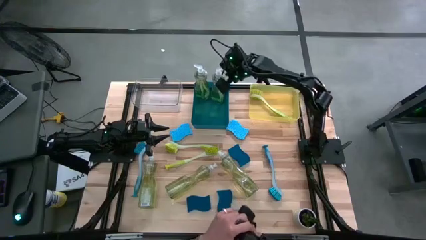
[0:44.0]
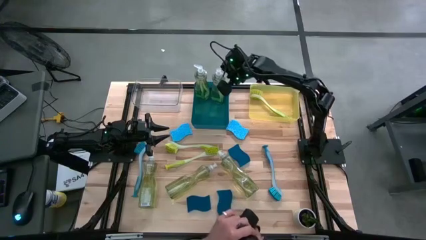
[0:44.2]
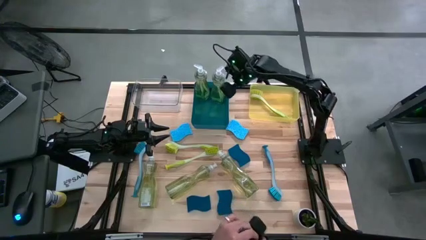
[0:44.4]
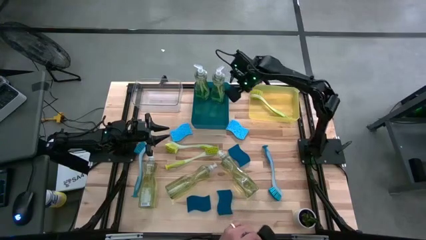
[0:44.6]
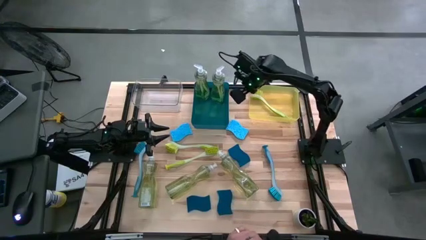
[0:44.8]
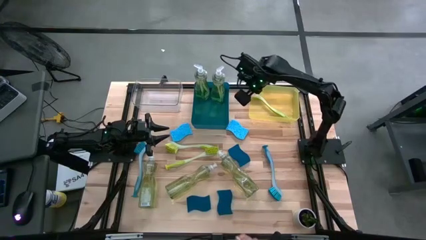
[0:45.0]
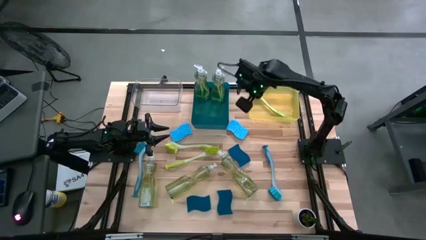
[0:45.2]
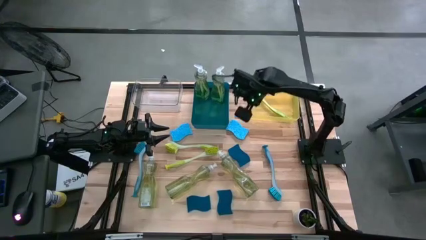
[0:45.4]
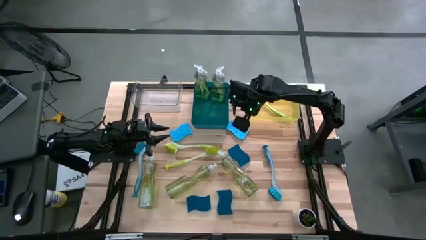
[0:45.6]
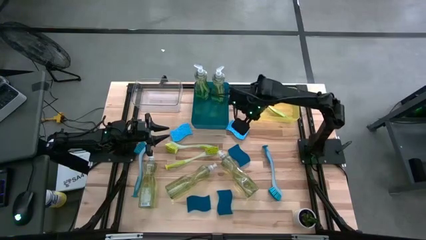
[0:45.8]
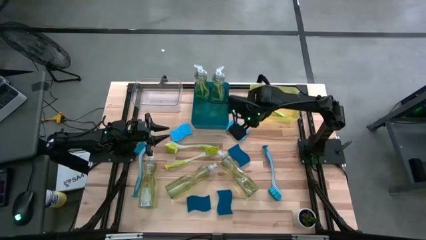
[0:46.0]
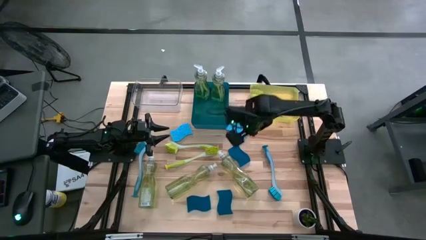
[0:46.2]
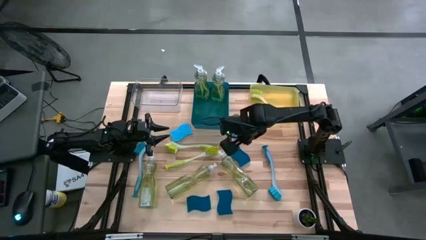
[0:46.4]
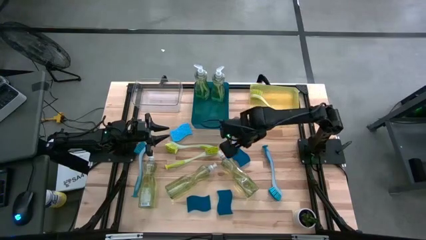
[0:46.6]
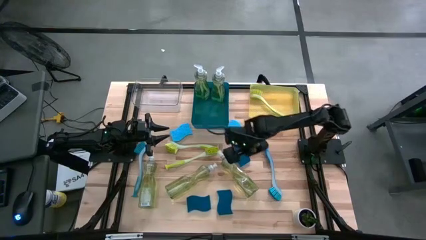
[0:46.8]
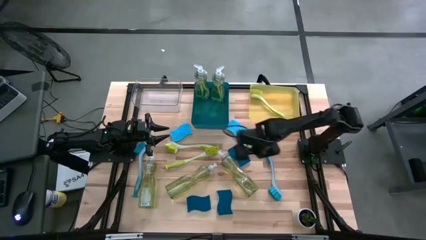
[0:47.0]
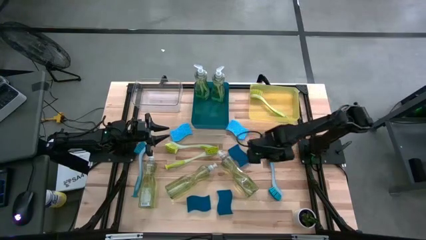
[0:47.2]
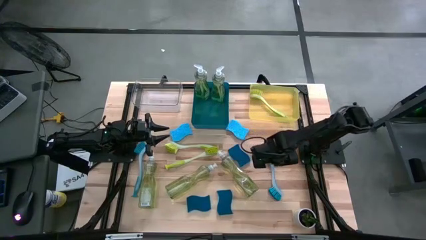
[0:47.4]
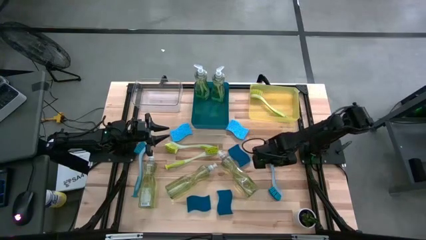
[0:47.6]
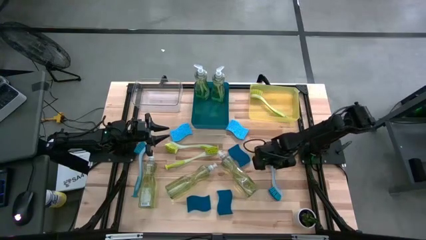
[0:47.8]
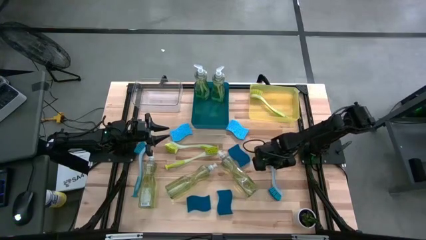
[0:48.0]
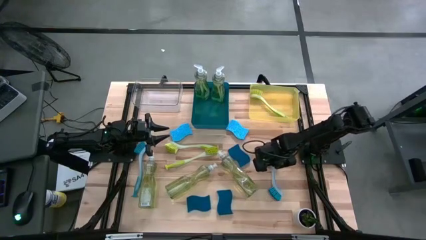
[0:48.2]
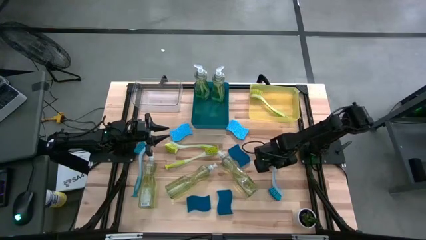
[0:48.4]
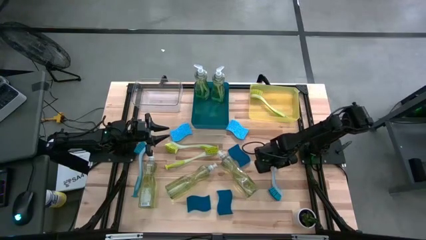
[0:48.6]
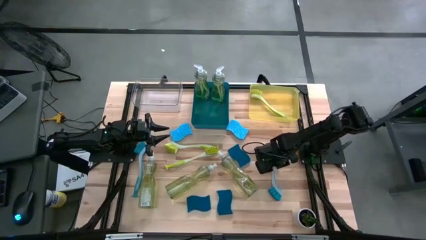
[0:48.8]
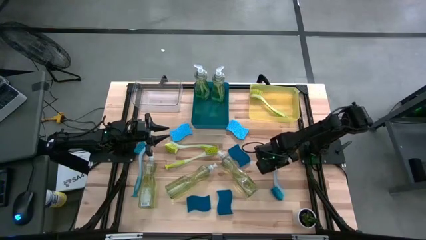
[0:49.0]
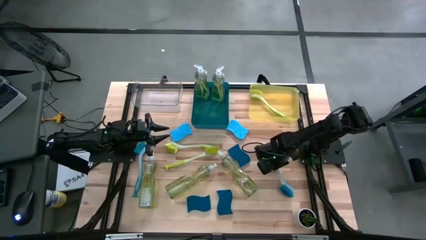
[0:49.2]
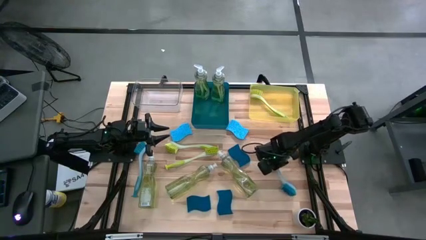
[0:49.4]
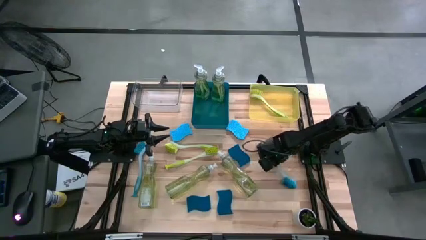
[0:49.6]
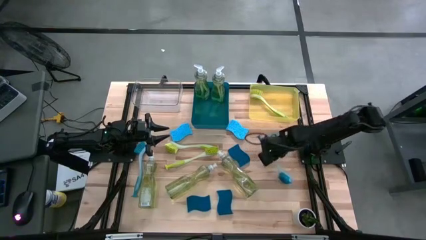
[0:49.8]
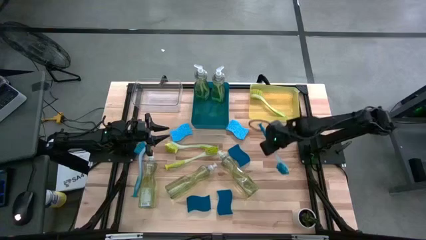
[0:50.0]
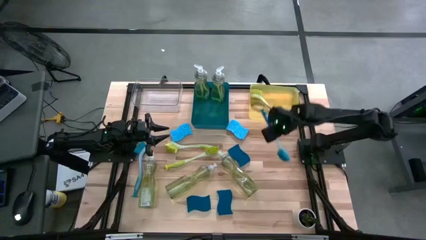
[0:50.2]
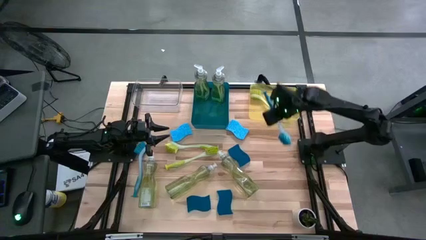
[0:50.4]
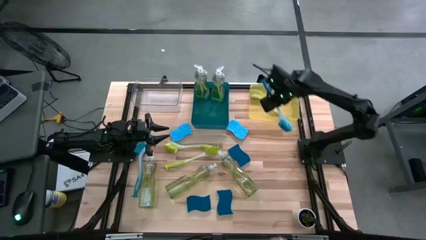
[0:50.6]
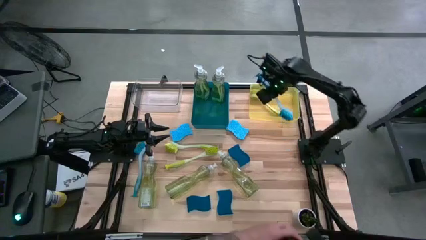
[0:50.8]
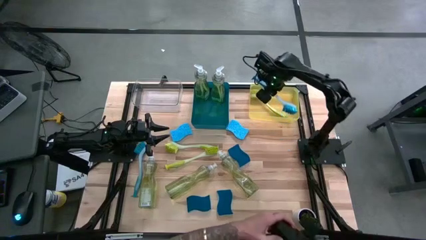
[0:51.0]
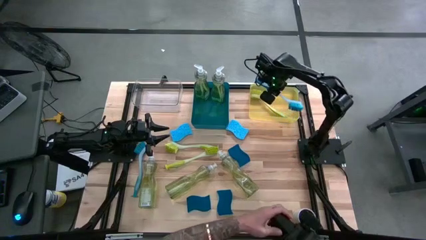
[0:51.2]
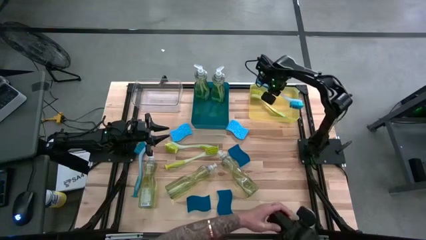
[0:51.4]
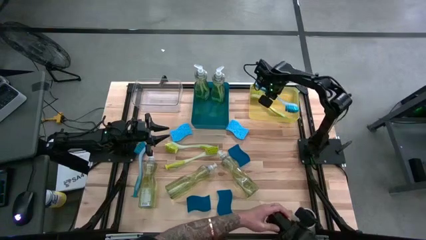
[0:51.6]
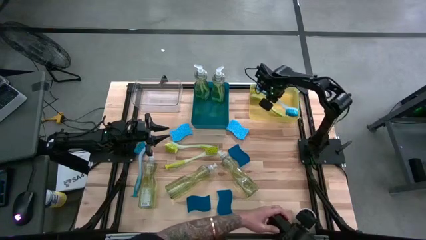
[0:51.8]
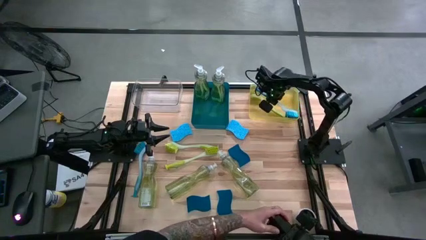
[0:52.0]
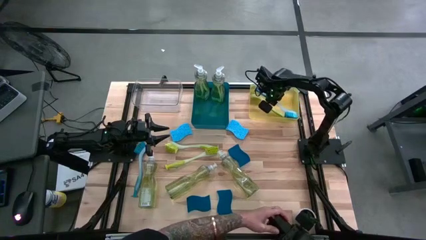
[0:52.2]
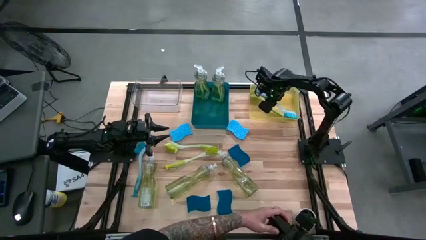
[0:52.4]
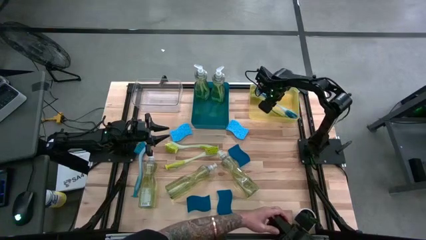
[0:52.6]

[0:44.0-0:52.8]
Task: Pick & Place Kitchen Sink Supplies
Put the blue dish brush into the yellow bin

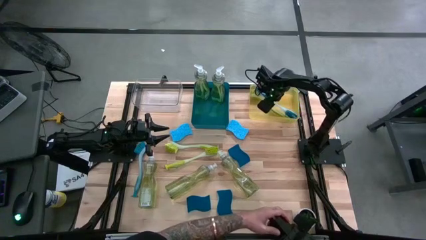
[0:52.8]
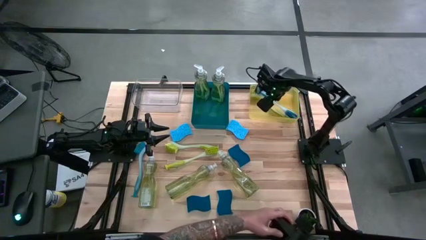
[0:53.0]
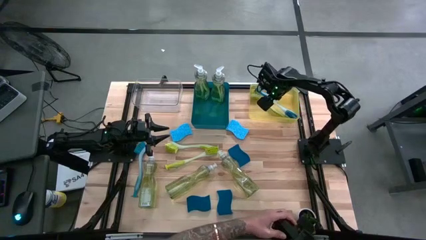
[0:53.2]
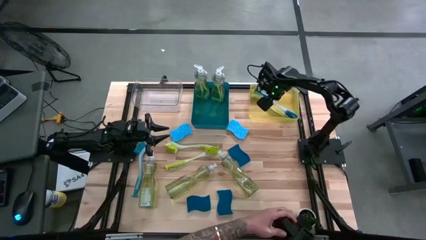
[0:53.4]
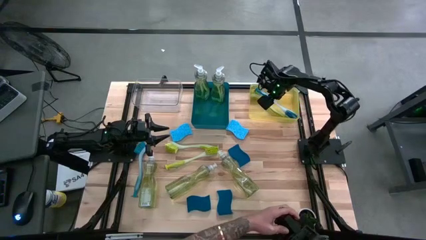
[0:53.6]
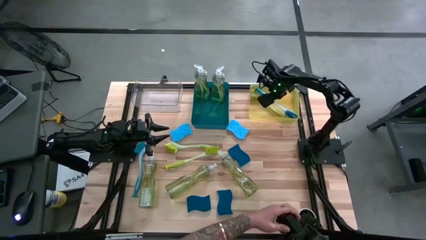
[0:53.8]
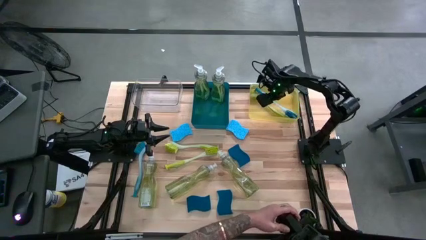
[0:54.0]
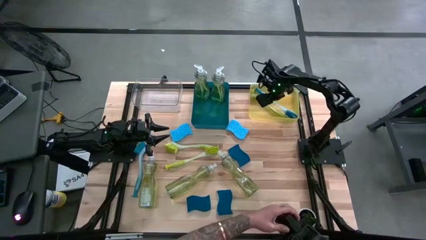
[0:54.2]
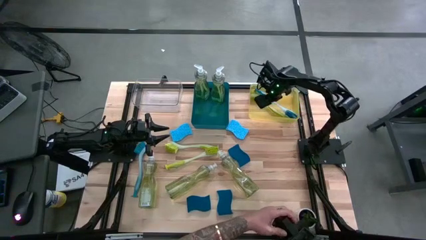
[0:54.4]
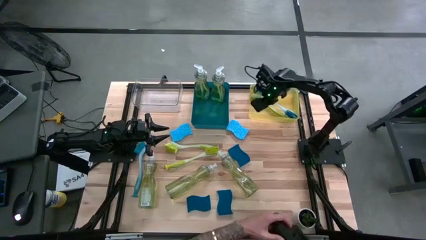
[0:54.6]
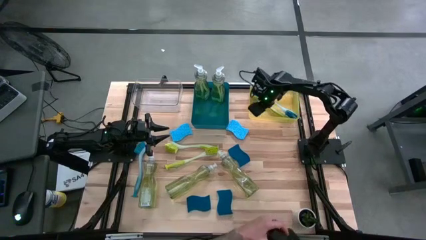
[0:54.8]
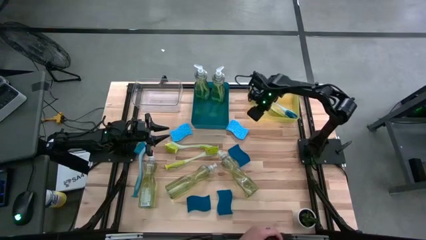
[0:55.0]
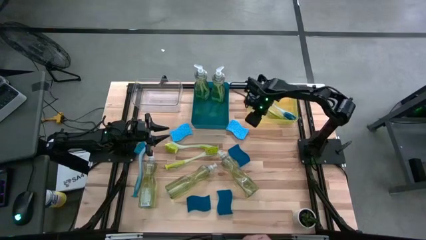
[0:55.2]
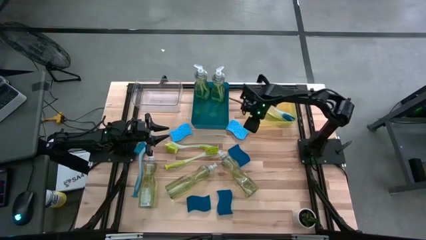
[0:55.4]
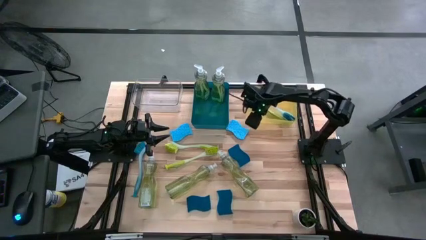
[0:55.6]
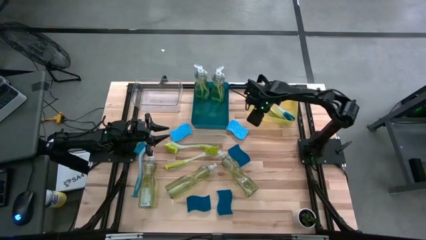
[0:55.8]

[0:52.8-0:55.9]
Adjust the yellow bin
